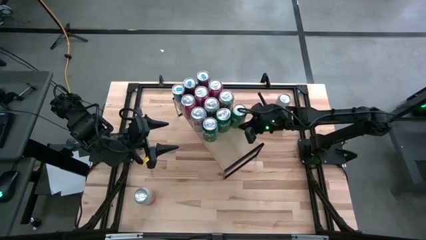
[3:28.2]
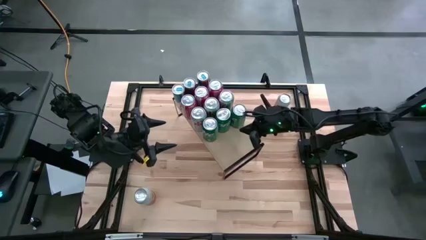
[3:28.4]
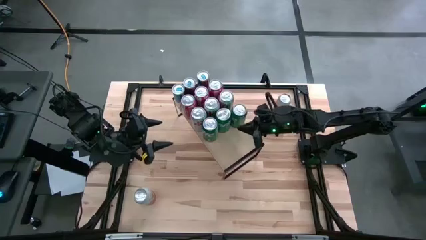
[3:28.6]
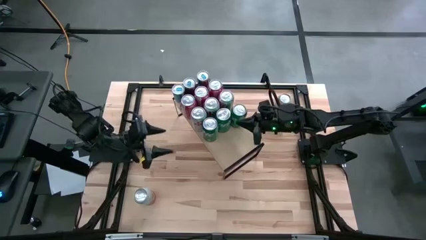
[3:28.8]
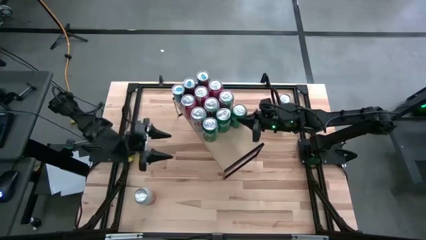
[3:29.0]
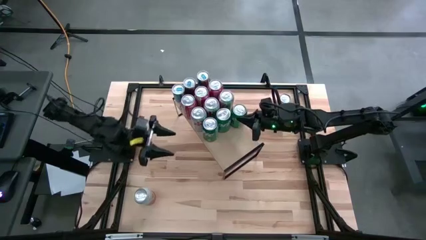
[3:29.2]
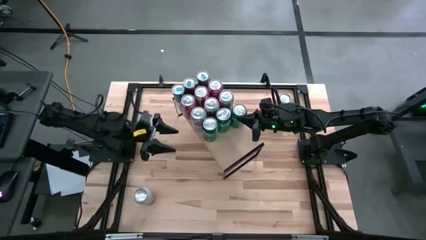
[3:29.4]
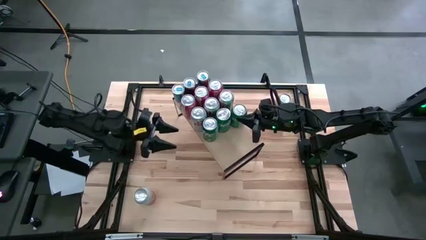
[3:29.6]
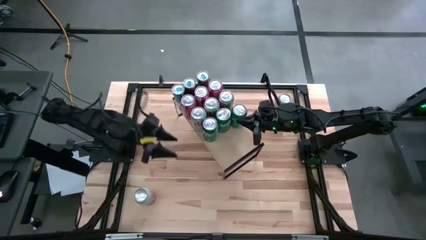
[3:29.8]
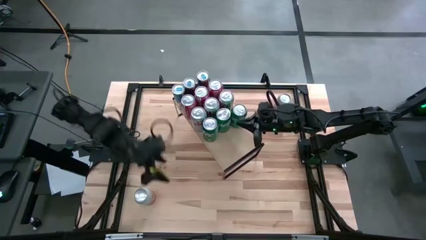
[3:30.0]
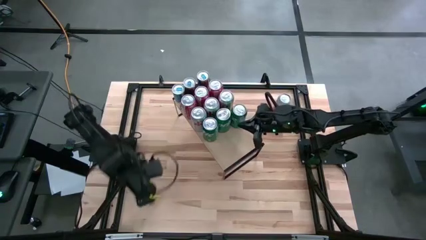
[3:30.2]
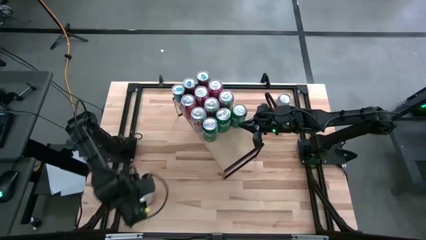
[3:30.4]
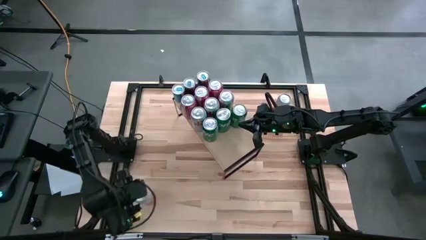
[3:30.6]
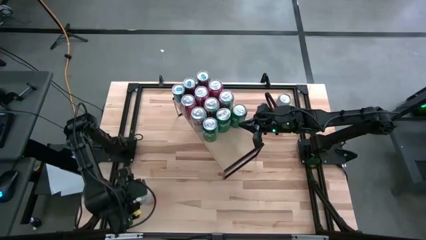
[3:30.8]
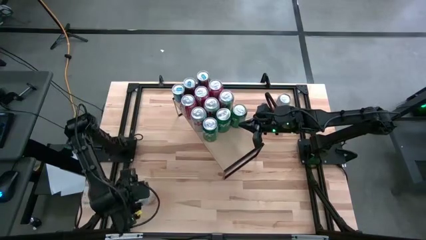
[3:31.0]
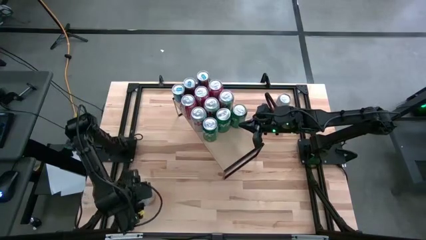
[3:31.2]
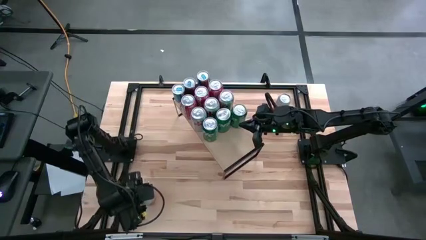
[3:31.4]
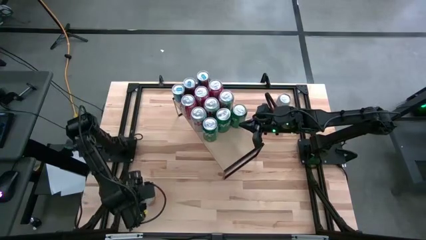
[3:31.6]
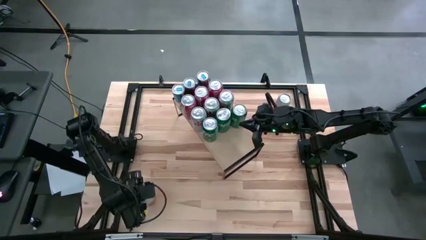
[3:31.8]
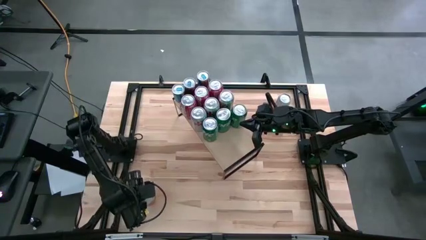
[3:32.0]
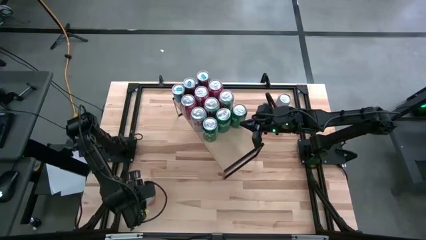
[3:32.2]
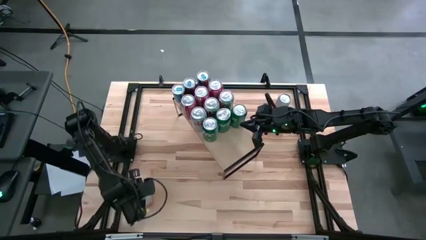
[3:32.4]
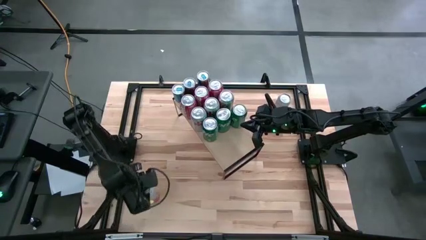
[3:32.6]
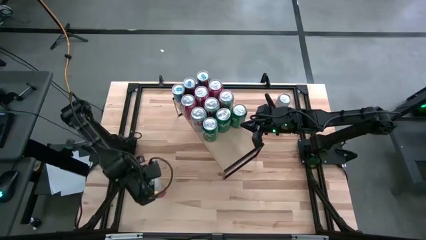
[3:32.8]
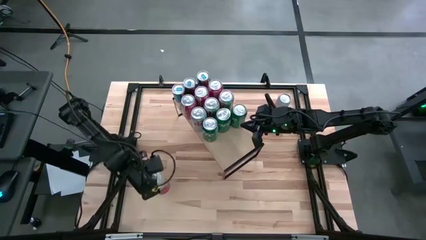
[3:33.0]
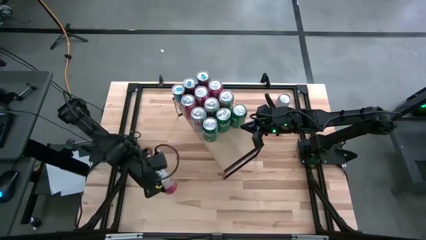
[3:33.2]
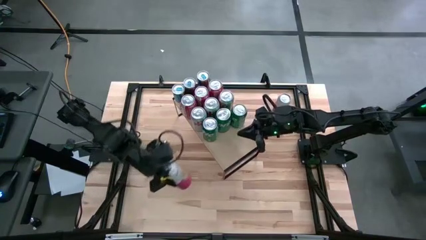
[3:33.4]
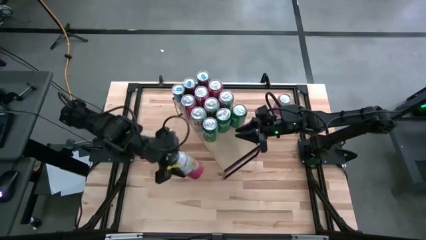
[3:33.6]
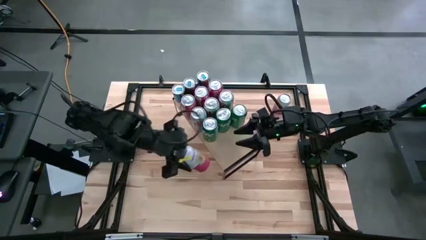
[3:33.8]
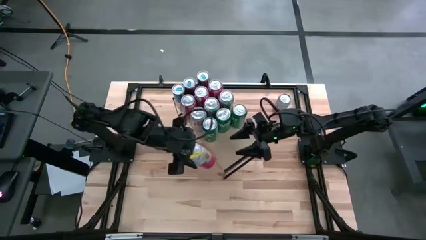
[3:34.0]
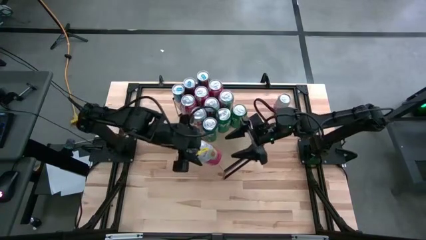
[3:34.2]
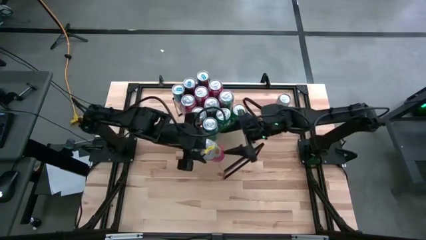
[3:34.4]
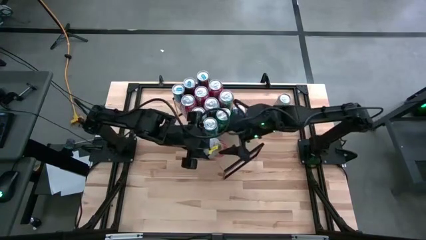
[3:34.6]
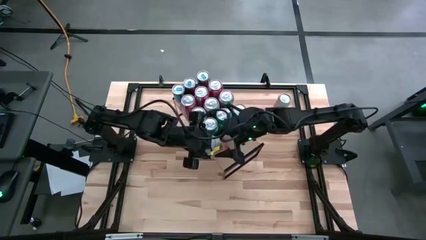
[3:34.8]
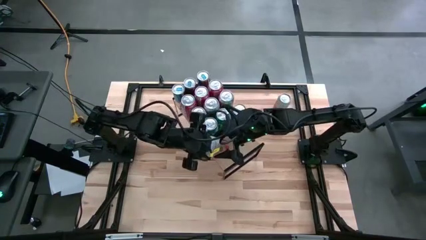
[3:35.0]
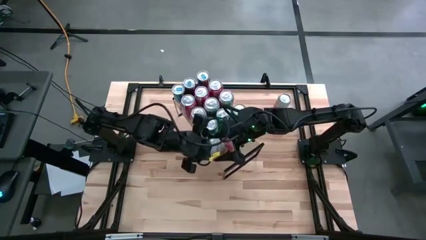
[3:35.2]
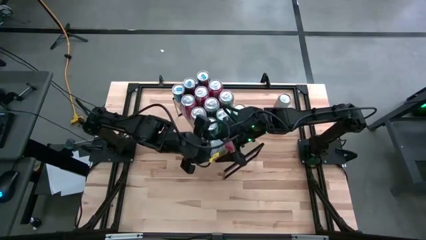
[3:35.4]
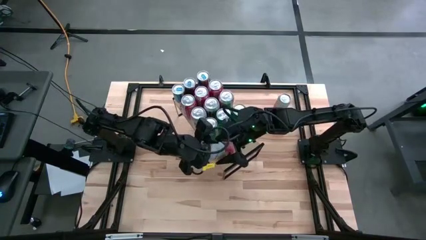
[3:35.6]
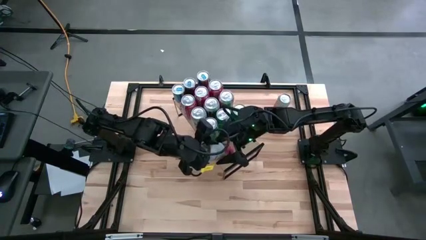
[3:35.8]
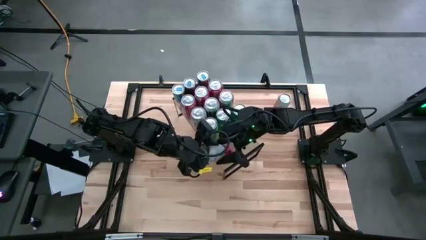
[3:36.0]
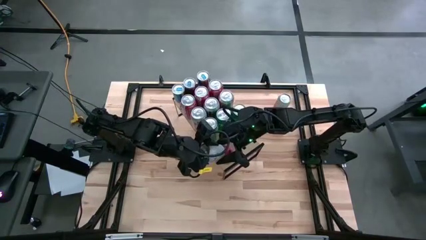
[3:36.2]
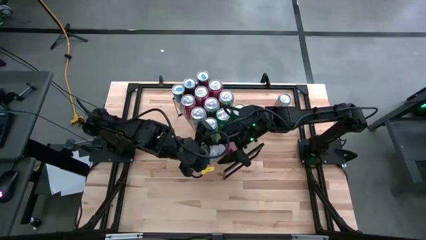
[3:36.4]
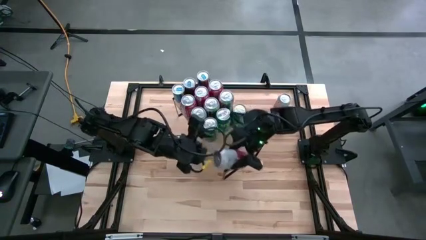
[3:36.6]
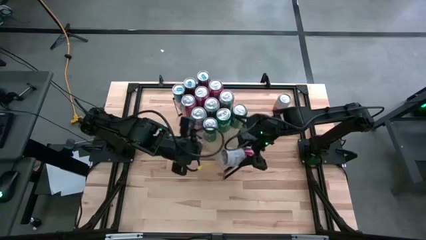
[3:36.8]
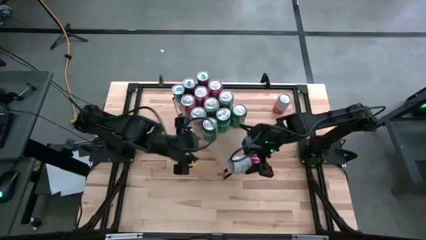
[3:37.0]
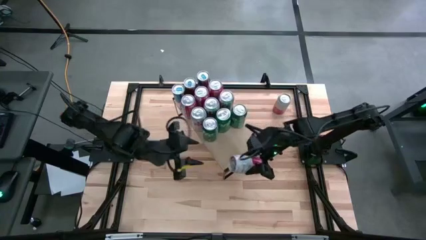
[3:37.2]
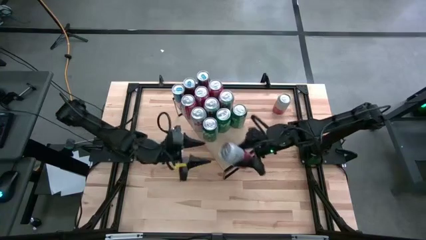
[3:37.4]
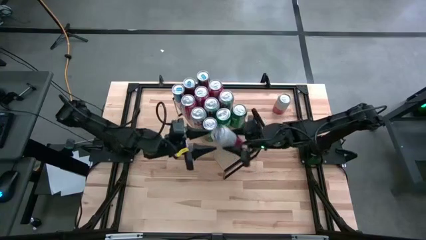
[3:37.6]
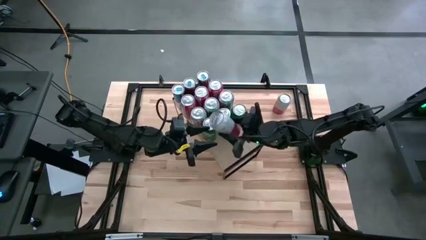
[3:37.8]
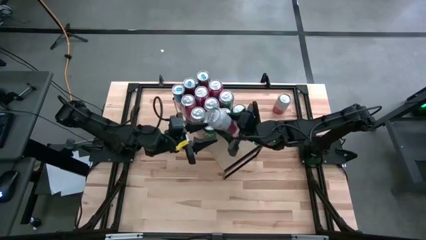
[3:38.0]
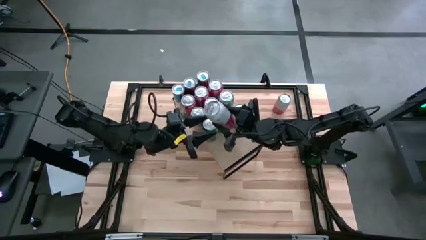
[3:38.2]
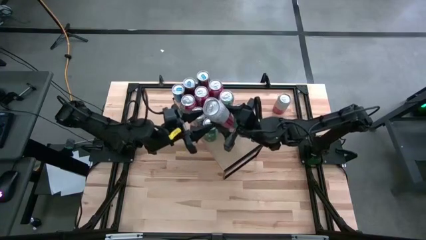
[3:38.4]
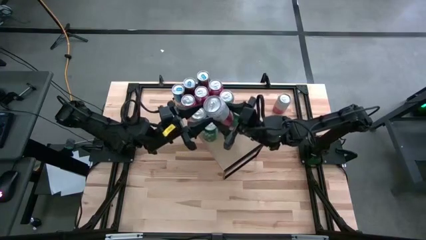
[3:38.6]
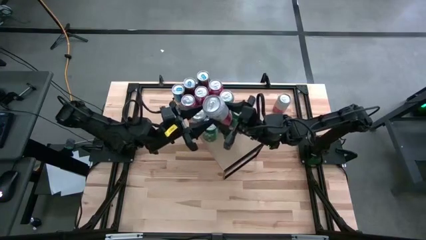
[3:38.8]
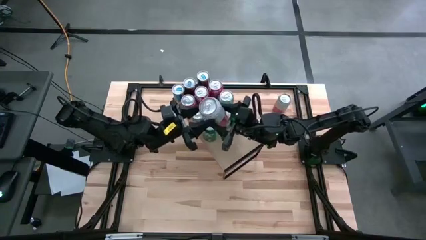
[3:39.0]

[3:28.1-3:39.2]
Task: Place canned beverage on shelf
Put the bottom pink soda can on the shelf

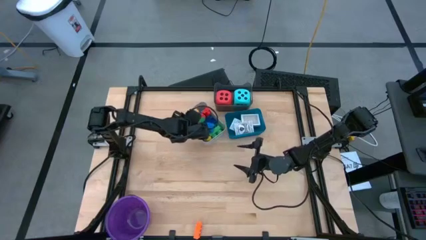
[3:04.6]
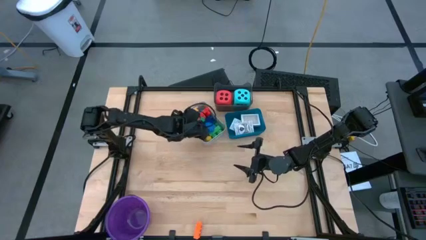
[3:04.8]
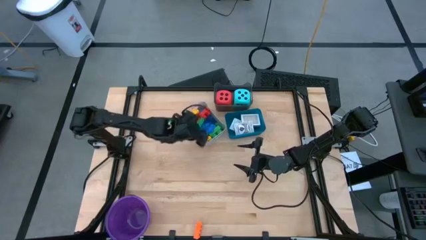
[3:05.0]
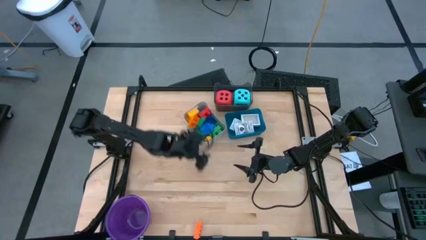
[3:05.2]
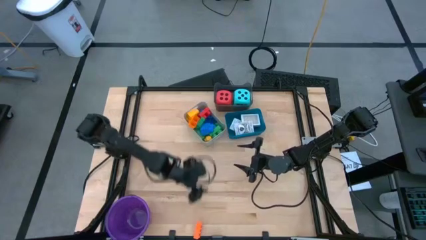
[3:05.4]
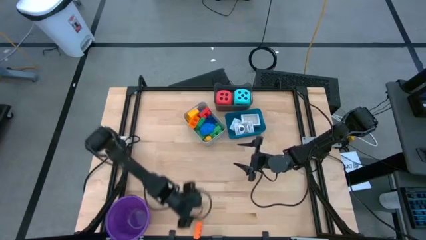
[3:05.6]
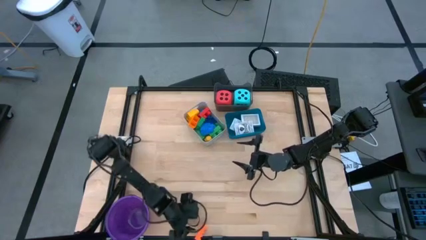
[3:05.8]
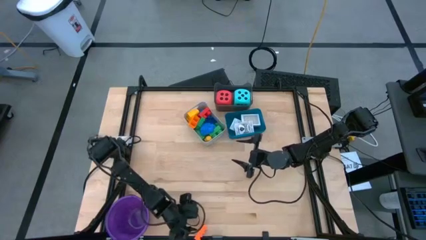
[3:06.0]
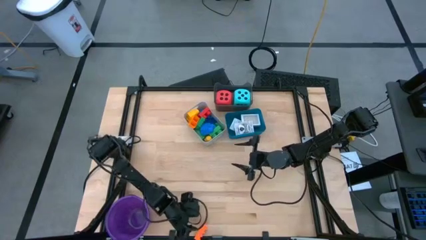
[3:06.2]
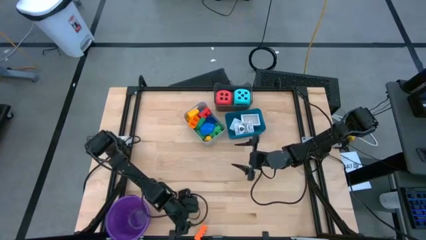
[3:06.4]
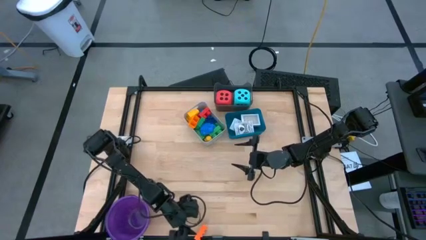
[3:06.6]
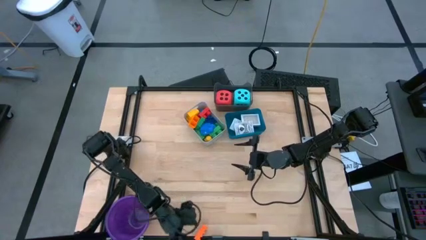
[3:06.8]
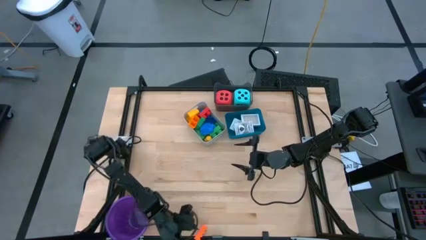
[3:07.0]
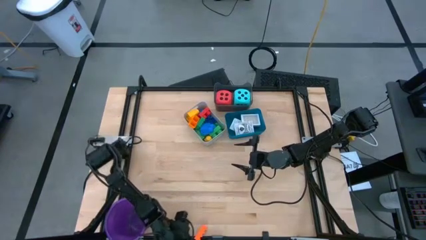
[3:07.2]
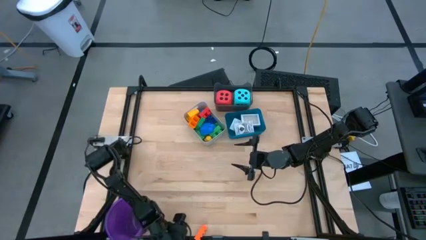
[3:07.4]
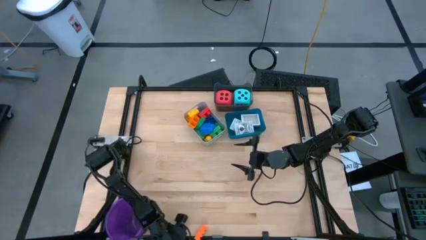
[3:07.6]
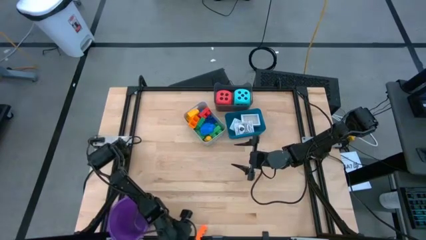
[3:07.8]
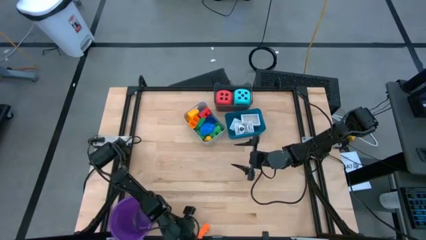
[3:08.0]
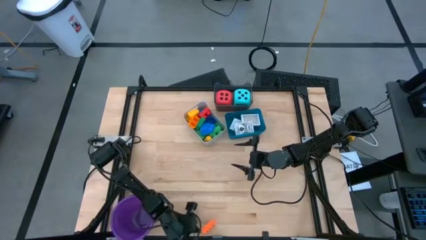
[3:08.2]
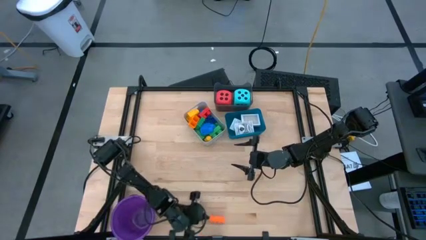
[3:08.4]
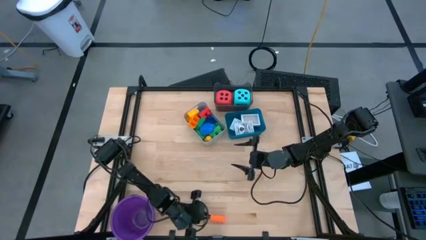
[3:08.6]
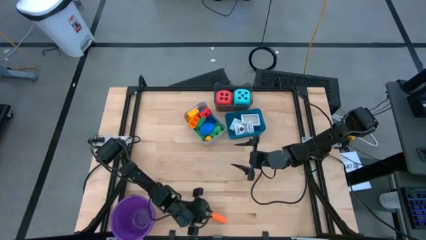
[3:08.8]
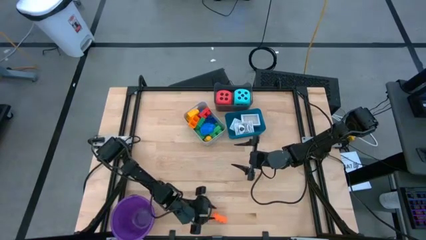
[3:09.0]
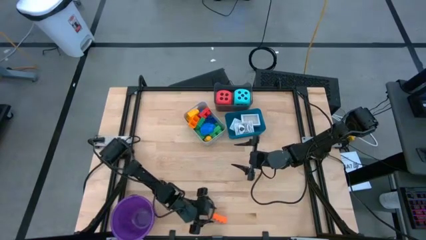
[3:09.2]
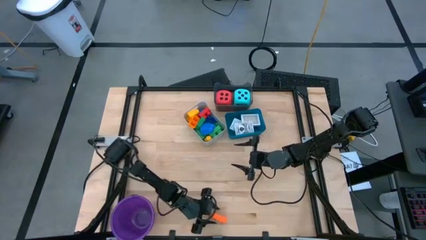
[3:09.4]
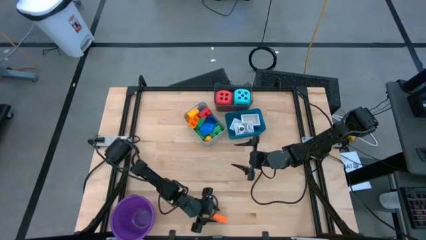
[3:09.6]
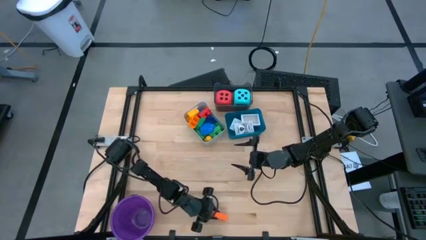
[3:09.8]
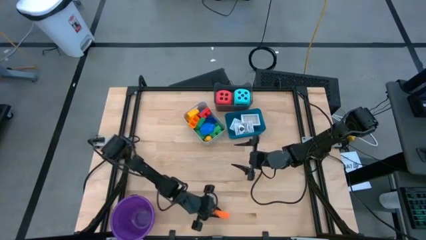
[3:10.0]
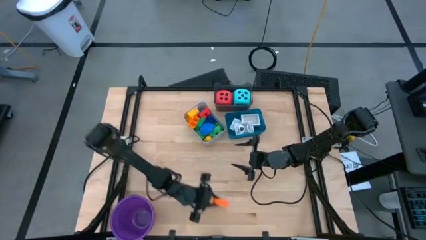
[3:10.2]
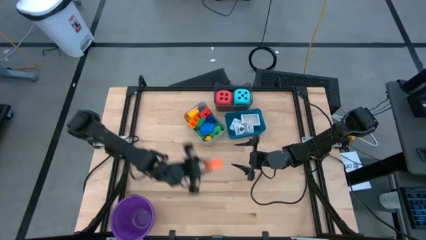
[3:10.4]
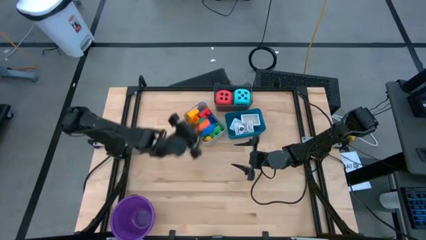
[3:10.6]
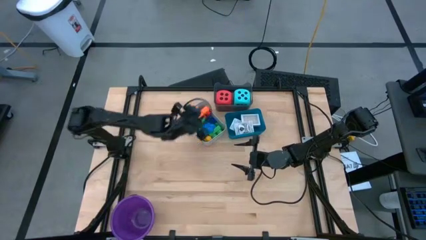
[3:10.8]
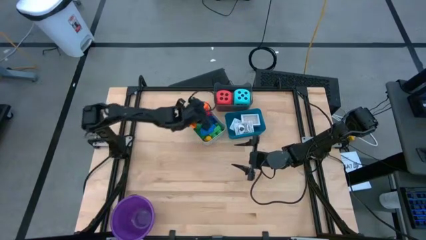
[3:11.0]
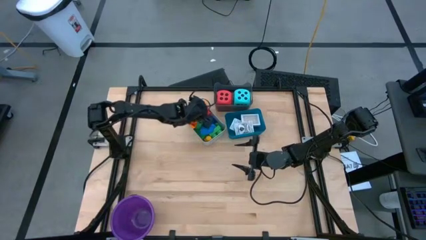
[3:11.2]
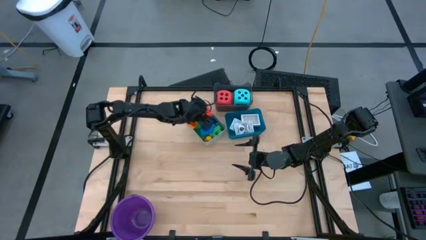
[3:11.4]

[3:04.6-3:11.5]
Task: Pick & Place Toys
Put the orange game piece into the gray bin
